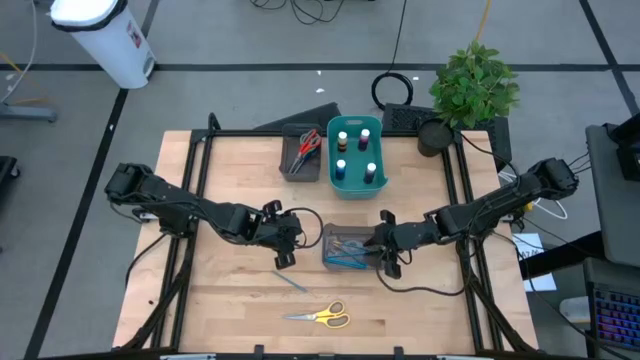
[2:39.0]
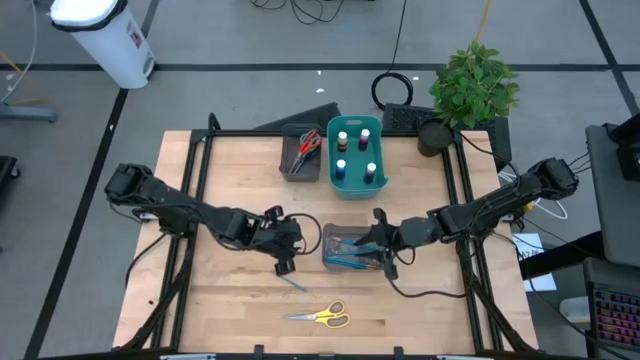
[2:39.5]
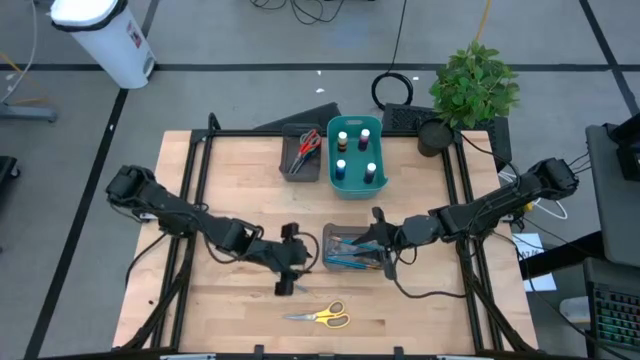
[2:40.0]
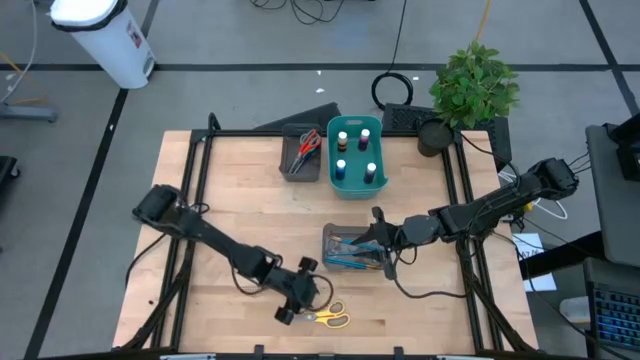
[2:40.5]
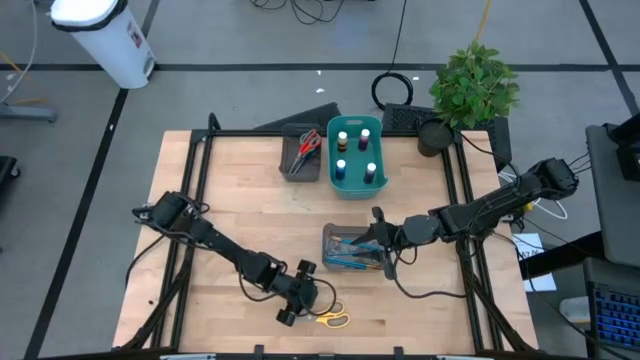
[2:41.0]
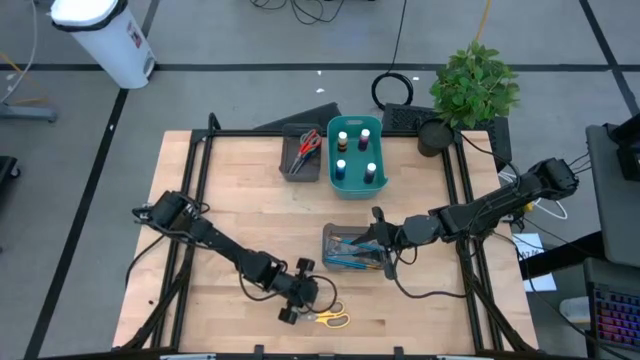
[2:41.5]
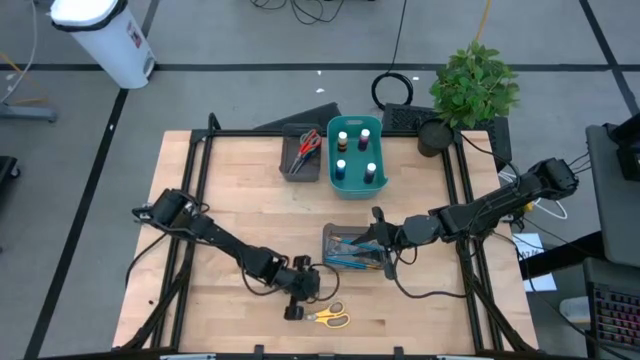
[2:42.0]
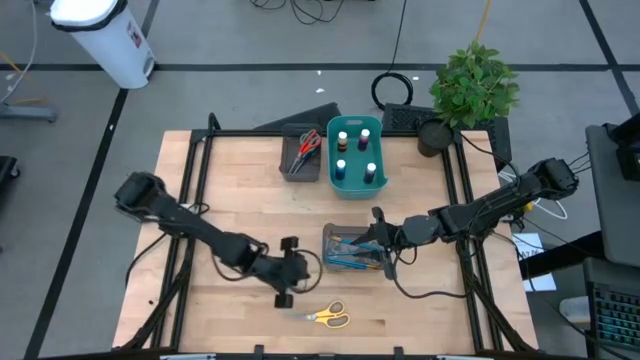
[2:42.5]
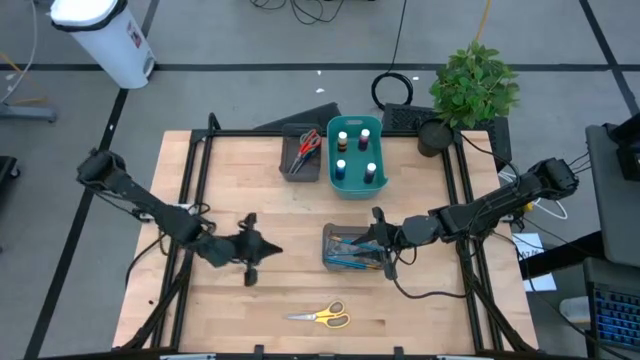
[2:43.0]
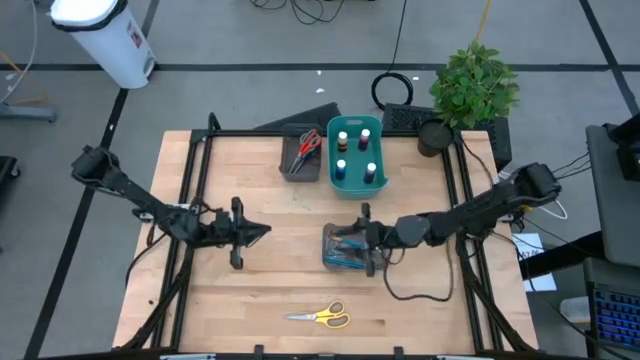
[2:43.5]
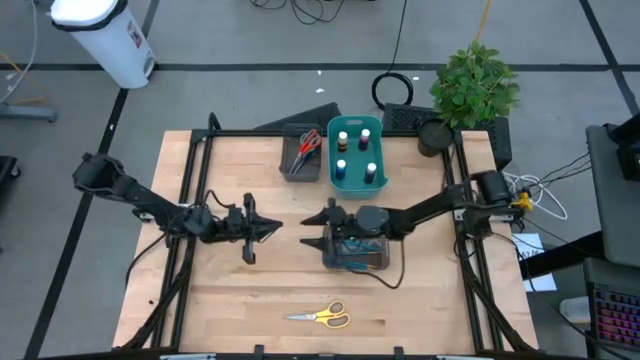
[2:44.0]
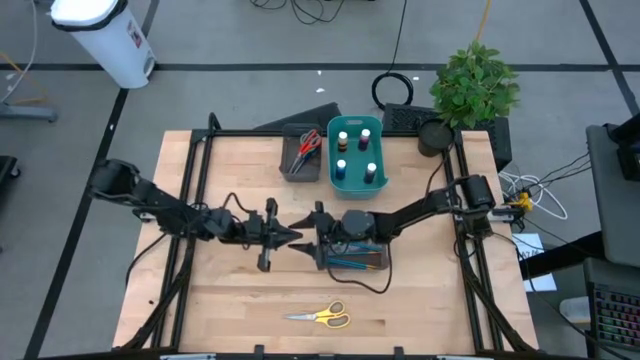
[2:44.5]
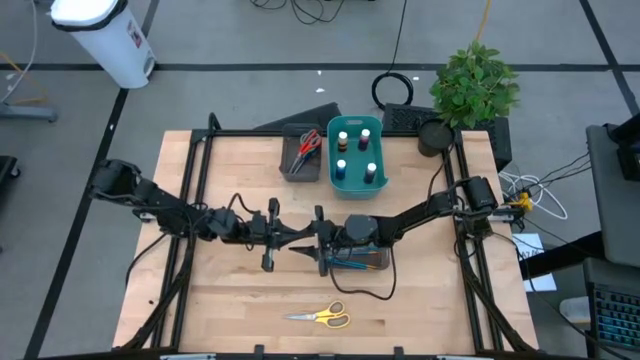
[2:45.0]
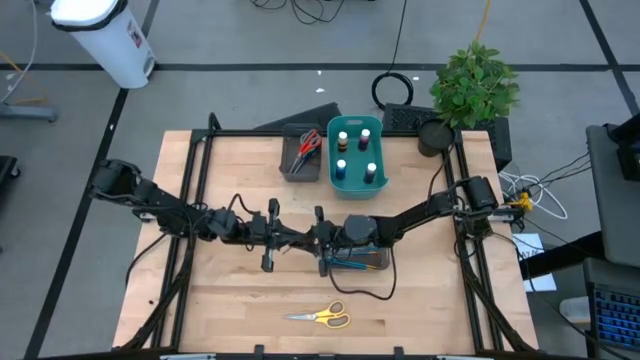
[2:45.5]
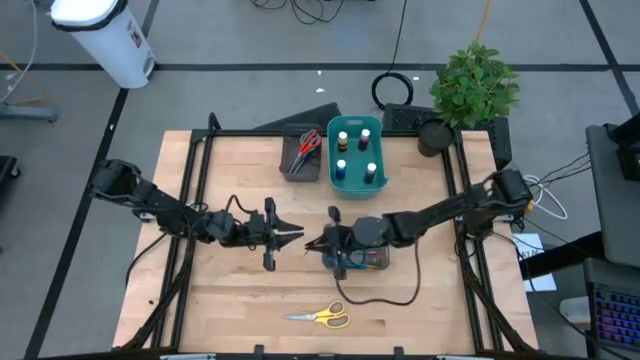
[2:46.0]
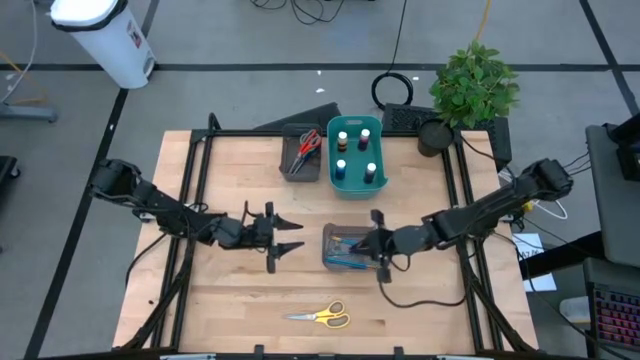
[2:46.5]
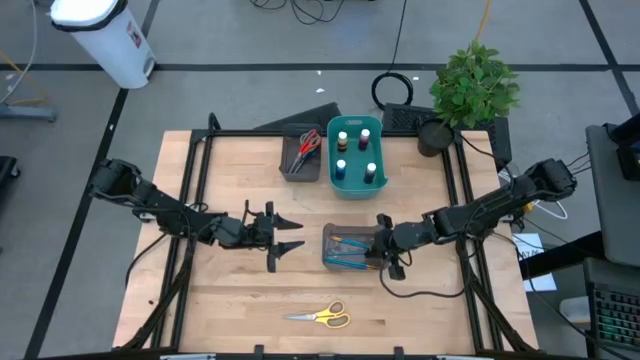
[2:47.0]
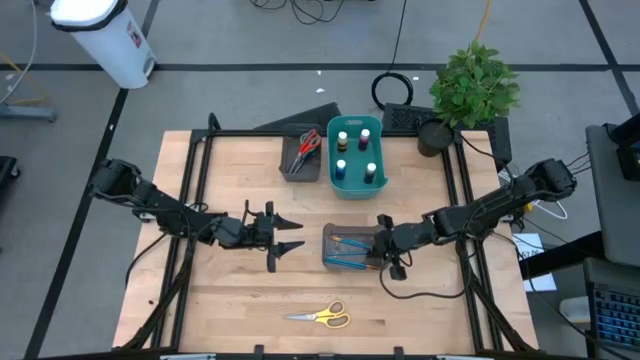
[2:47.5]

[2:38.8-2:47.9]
Task: Pick & Place Paint Supplies
Put the blue paint brush into the bottom black bin

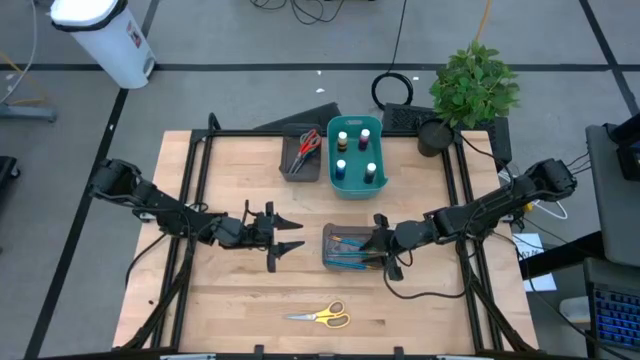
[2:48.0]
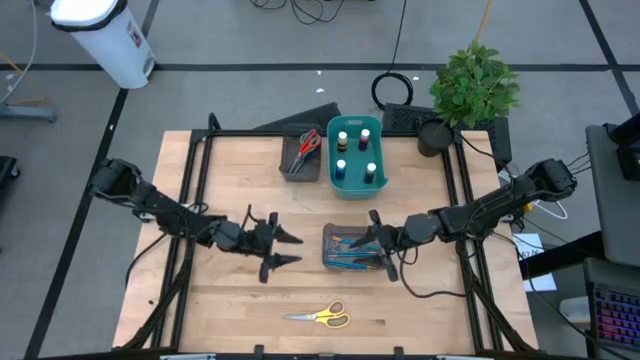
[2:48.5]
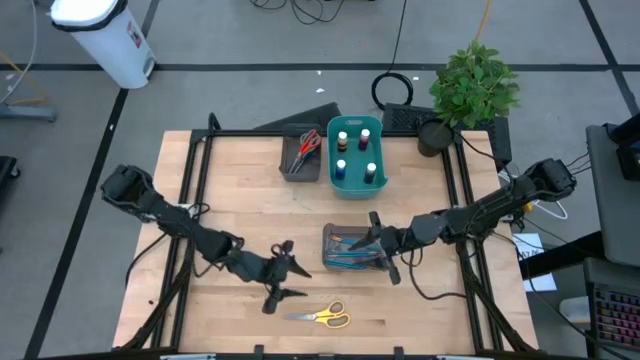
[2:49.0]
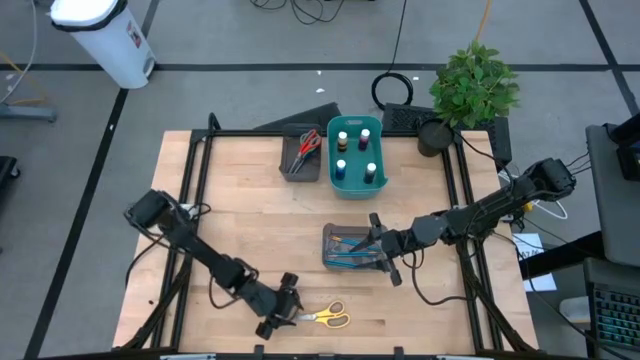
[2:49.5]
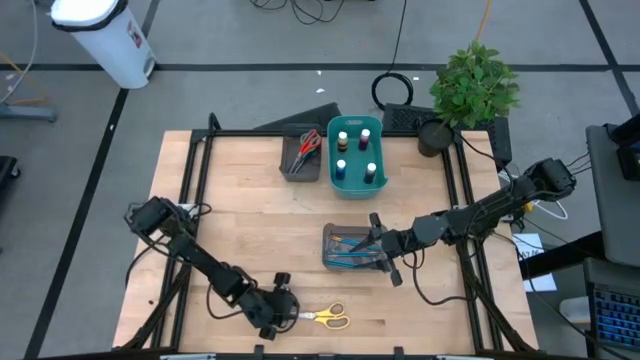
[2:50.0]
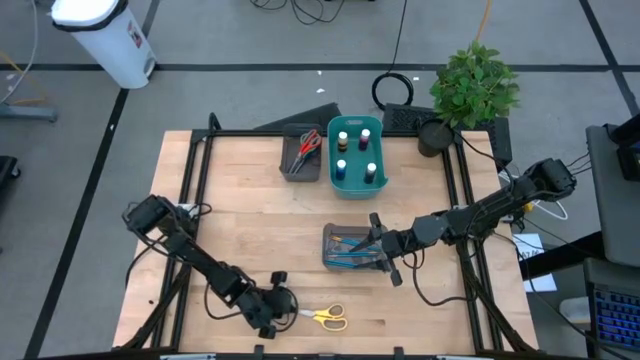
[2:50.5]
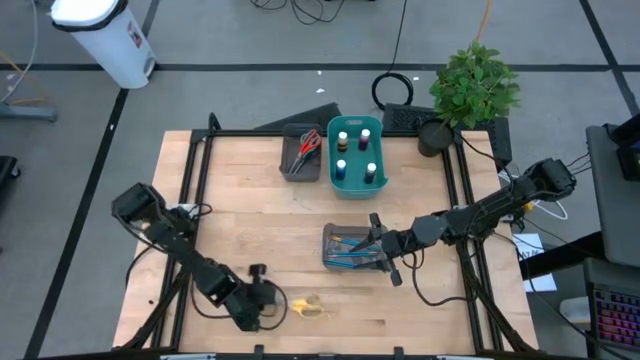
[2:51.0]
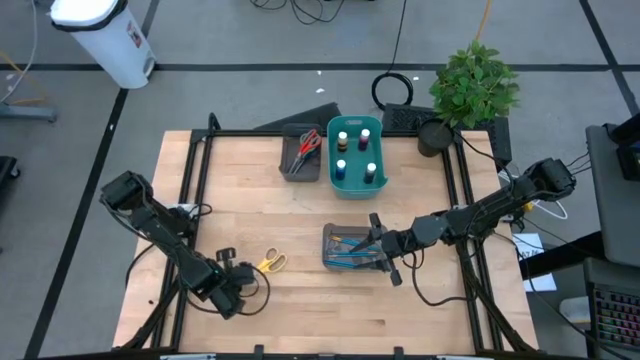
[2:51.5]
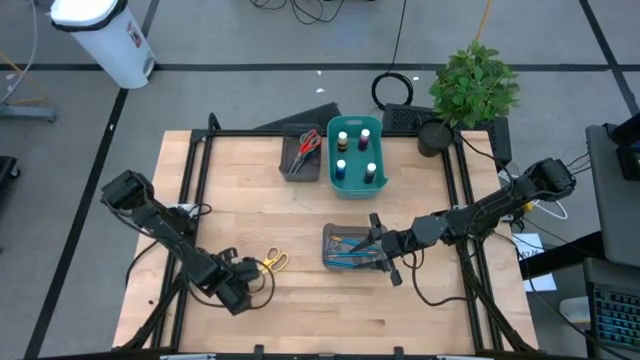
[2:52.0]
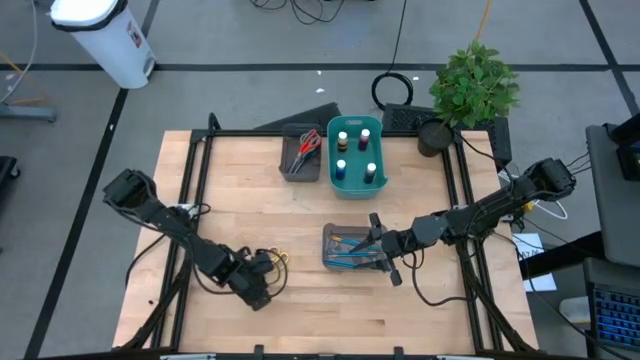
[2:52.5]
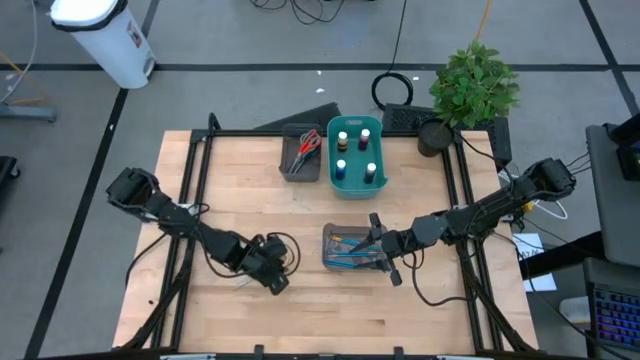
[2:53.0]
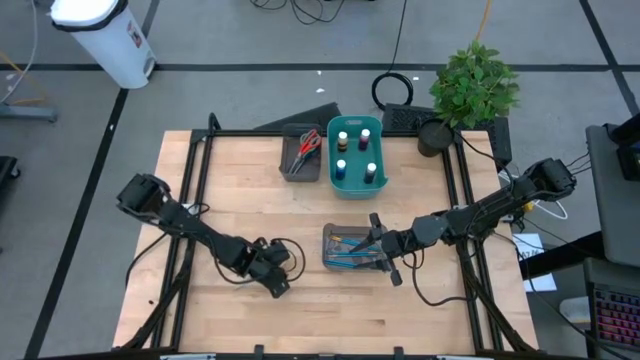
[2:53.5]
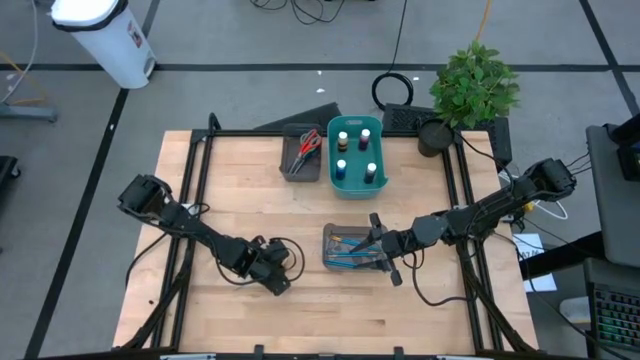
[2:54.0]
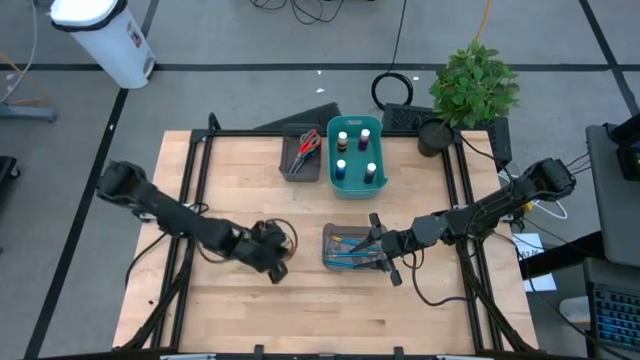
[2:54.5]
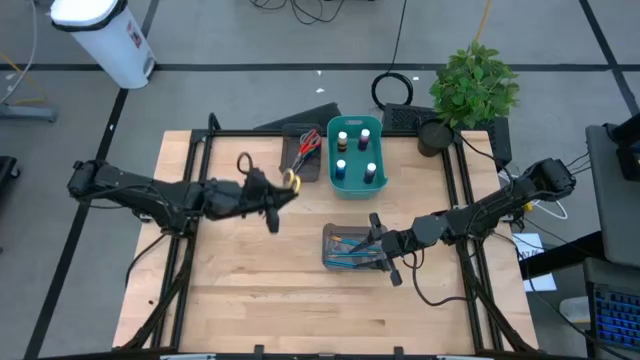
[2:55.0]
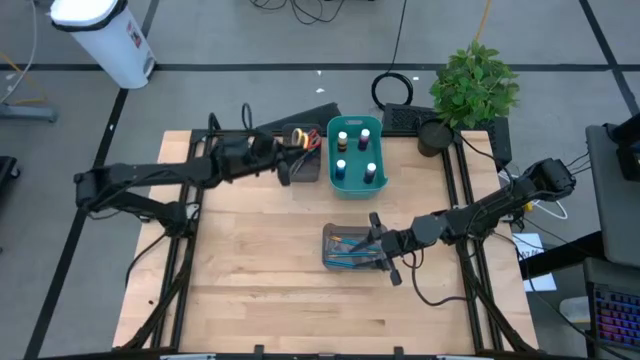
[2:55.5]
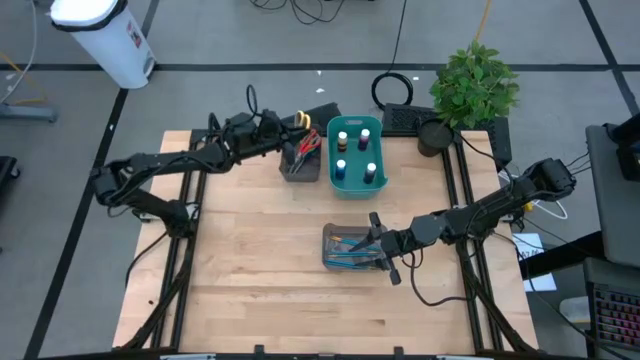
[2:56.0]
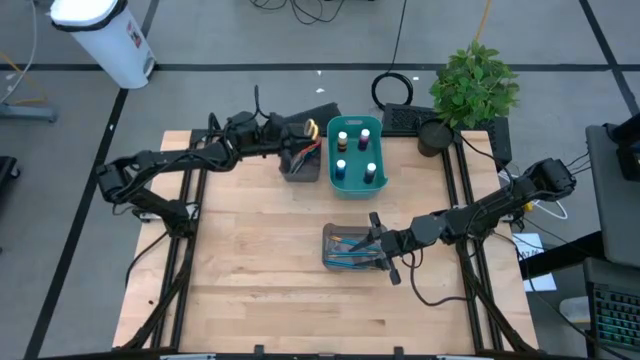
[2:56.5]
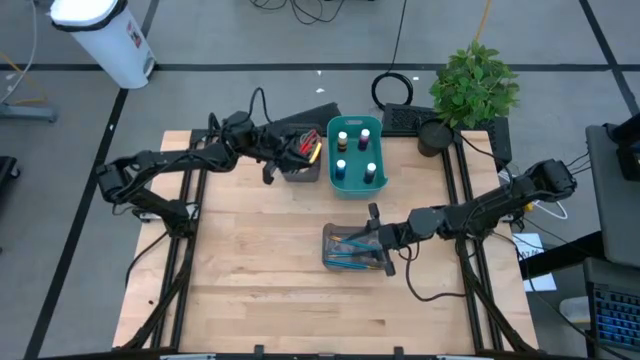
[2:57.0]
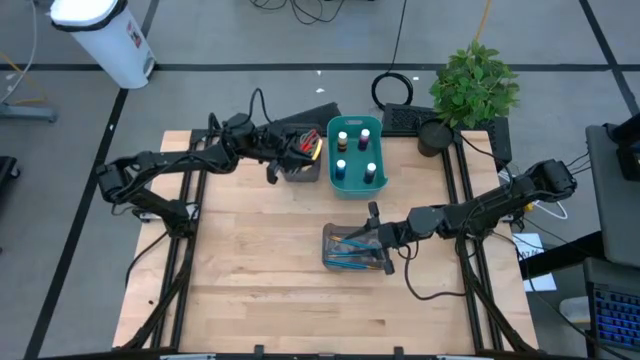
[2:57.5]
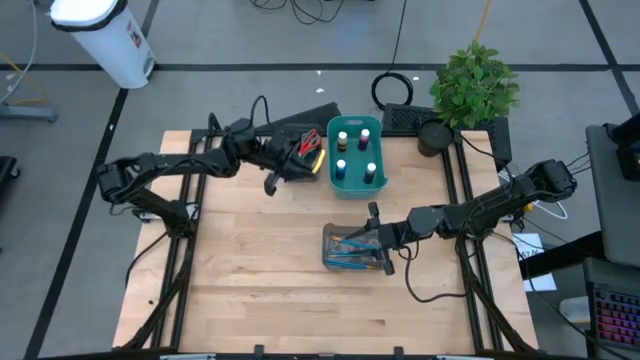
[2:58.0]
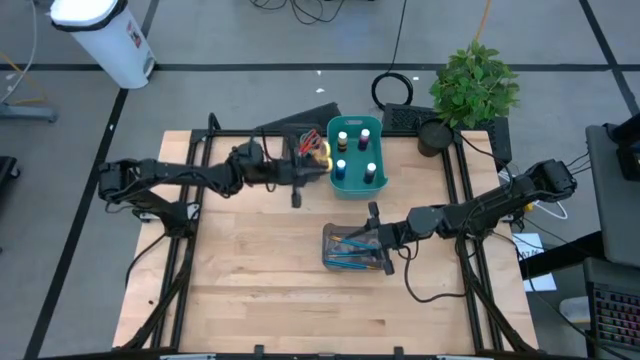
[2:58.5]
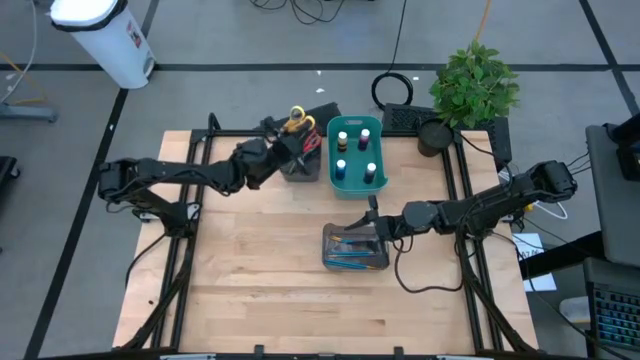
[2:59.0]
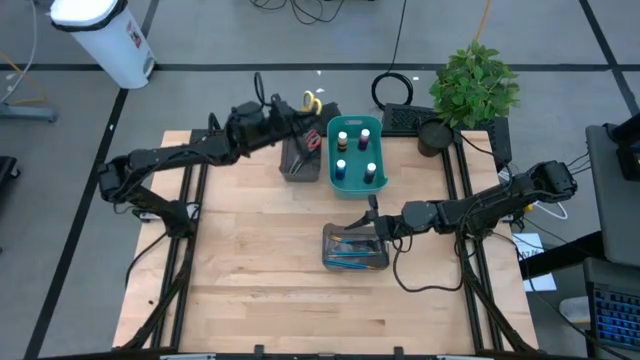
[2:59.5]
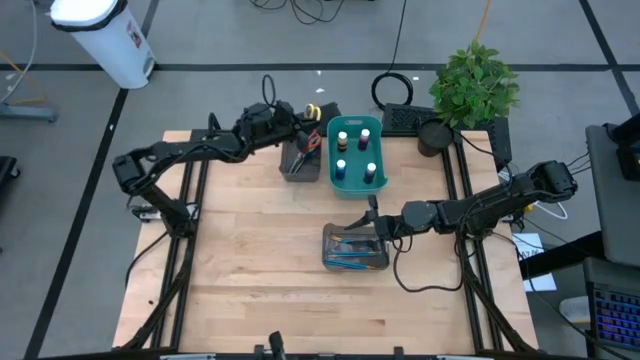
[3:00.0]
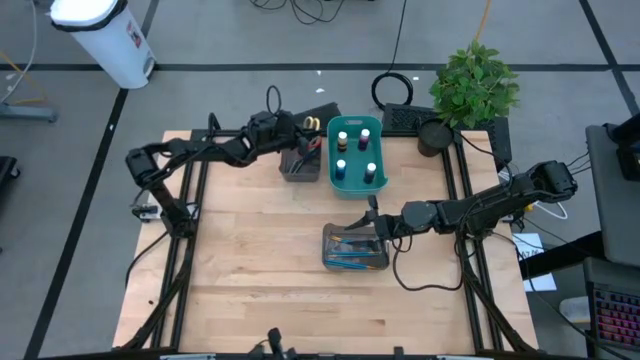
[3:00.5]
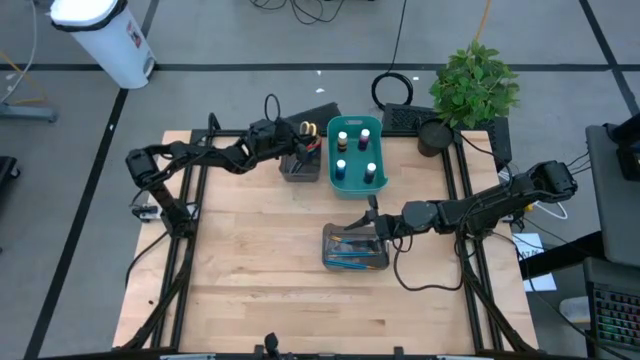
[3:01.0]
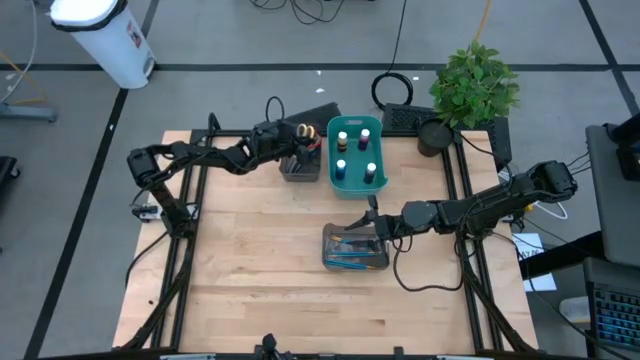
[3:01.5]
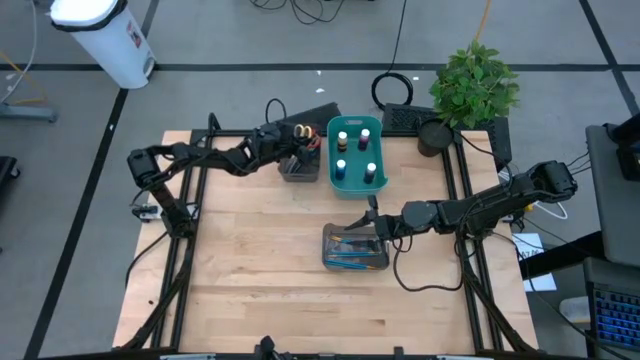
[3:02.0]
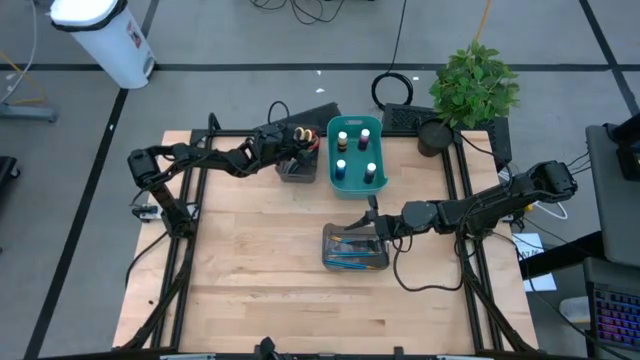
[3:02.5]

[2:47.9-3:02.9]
Put the yellow scissors into the top black bin
